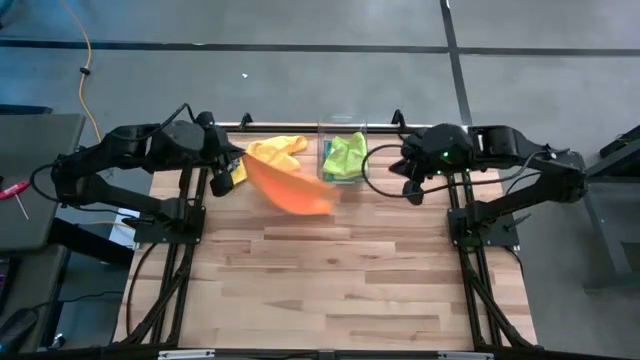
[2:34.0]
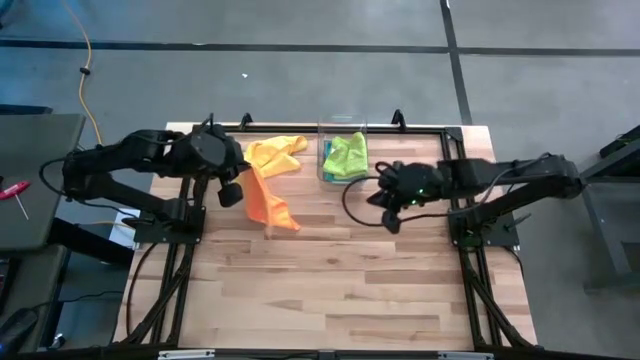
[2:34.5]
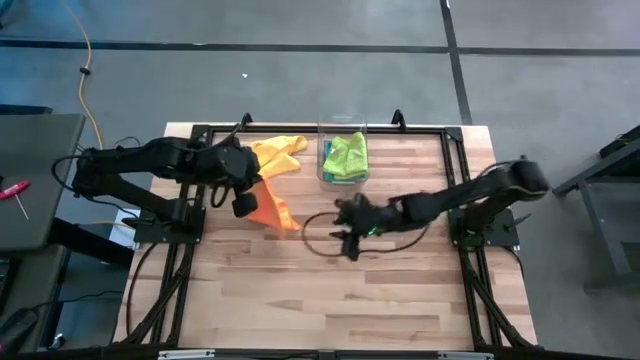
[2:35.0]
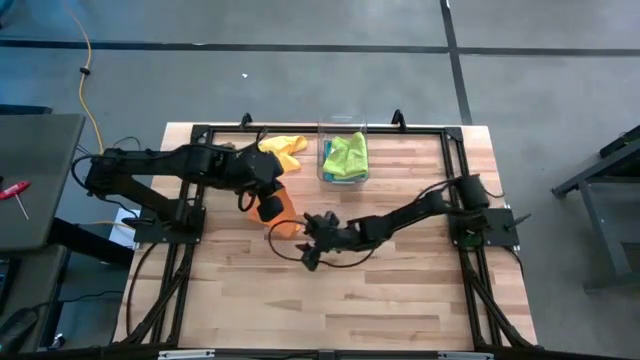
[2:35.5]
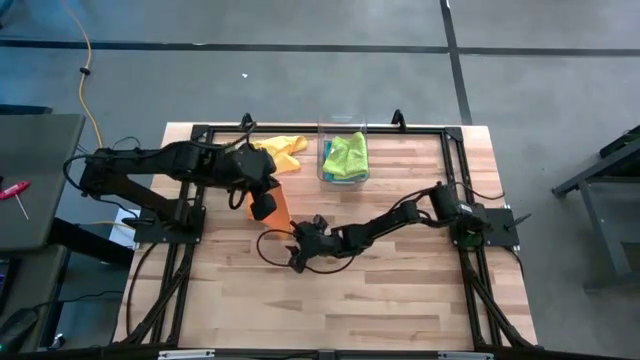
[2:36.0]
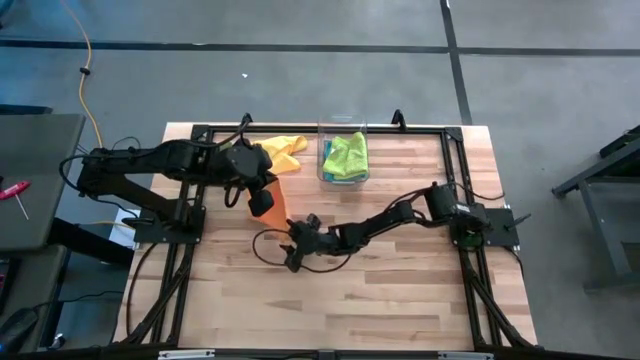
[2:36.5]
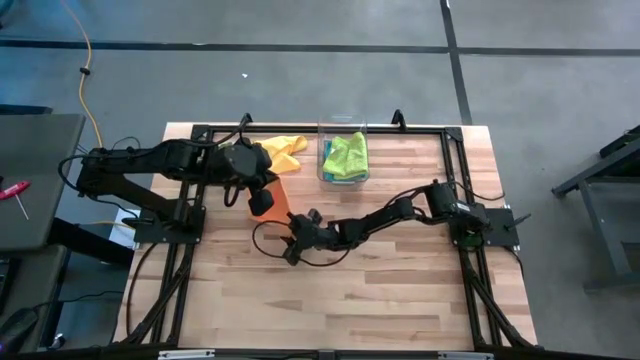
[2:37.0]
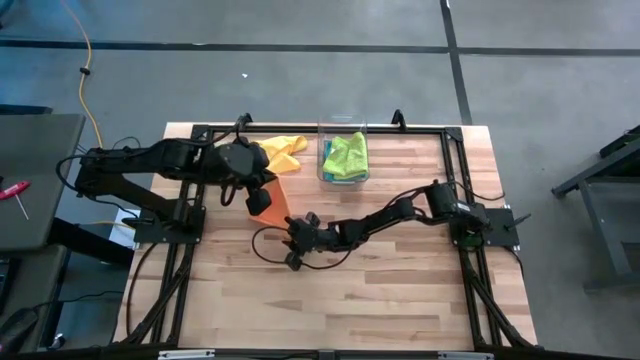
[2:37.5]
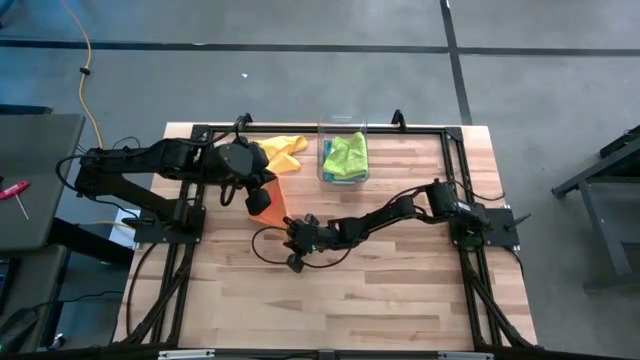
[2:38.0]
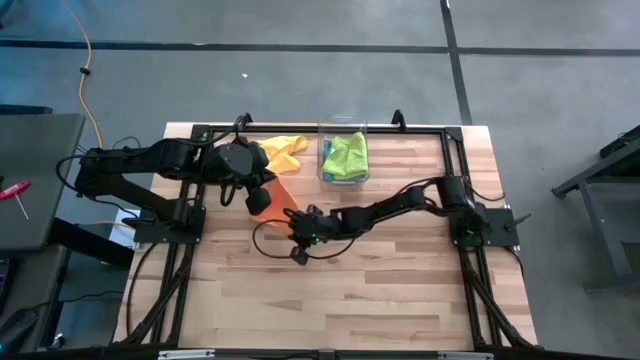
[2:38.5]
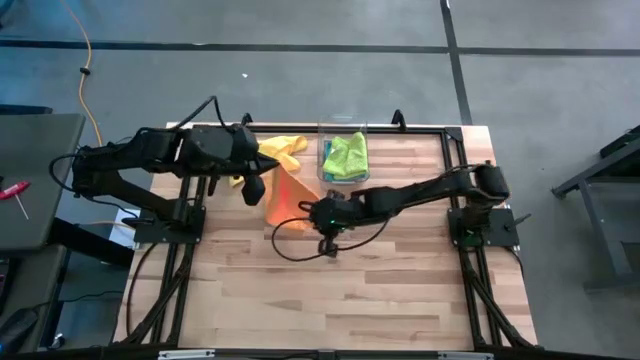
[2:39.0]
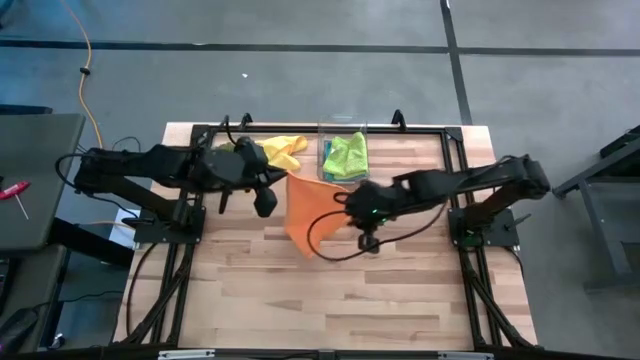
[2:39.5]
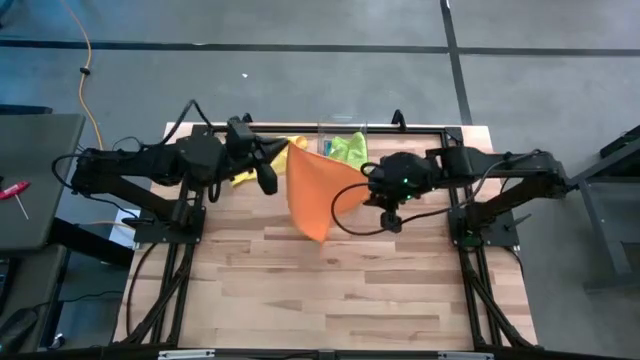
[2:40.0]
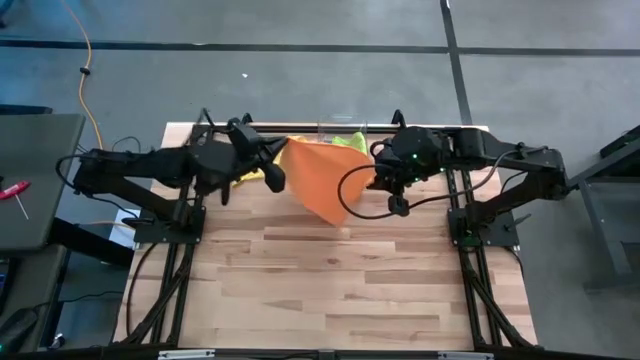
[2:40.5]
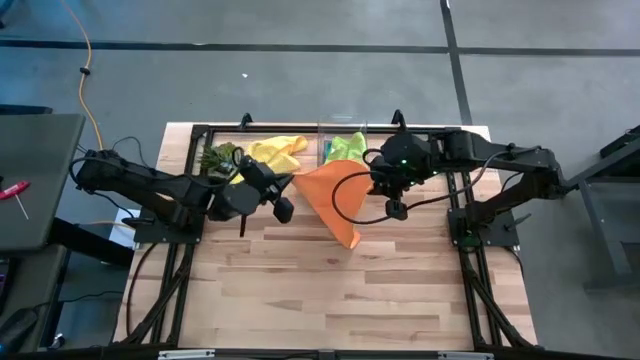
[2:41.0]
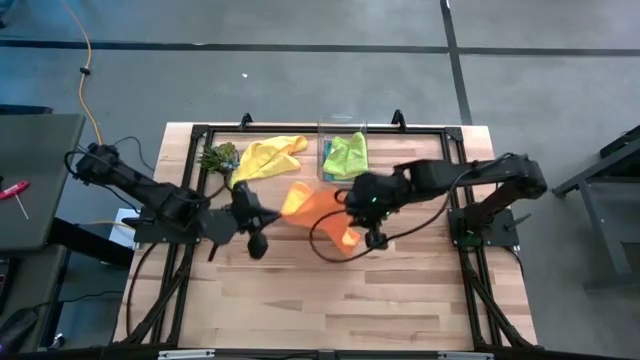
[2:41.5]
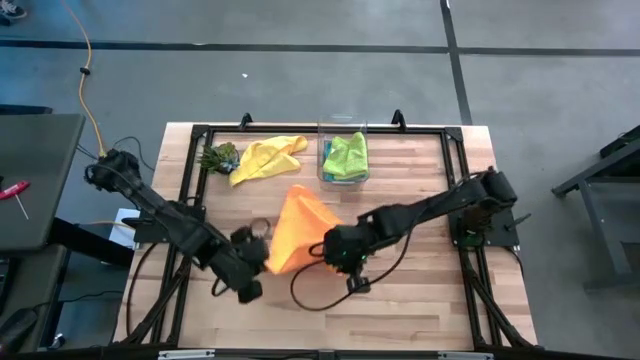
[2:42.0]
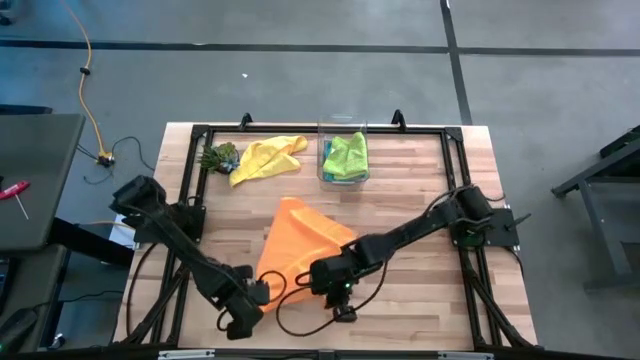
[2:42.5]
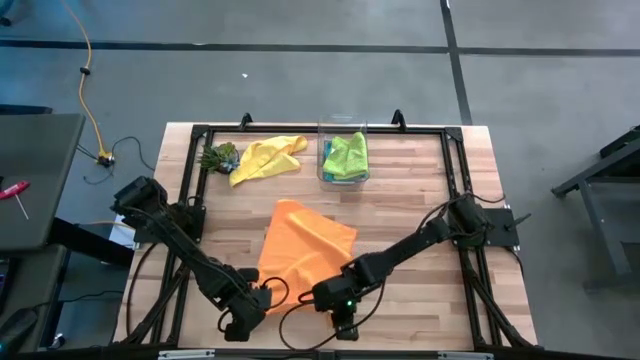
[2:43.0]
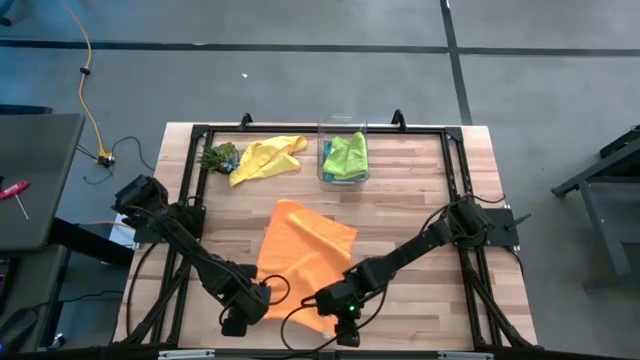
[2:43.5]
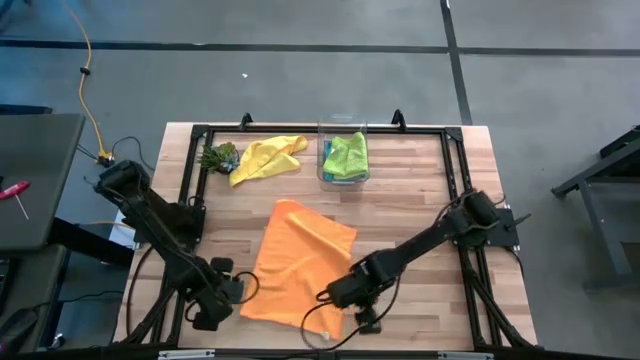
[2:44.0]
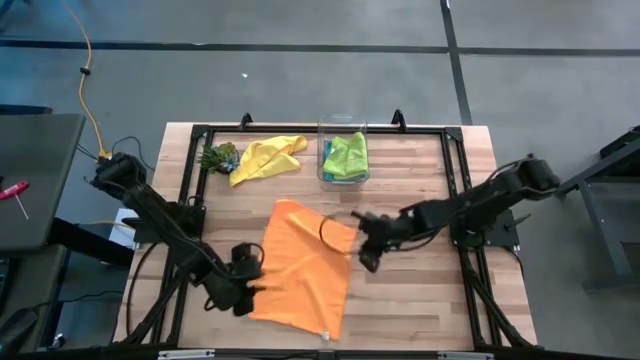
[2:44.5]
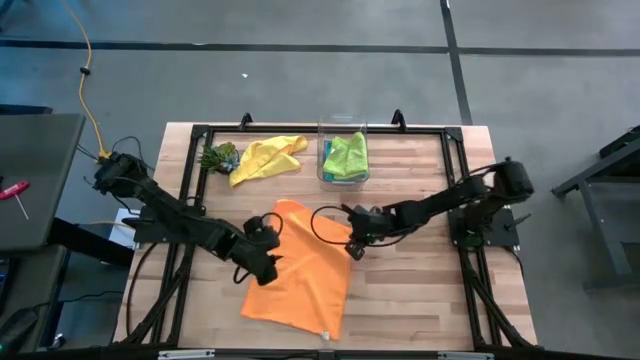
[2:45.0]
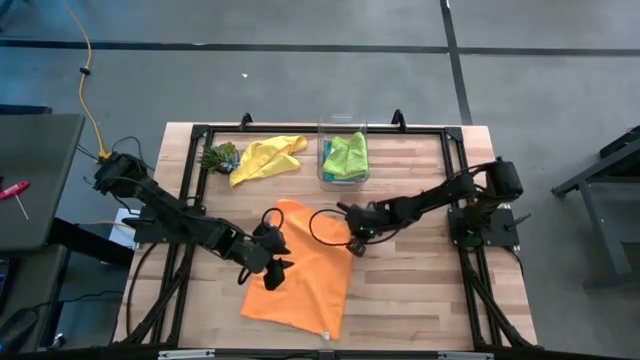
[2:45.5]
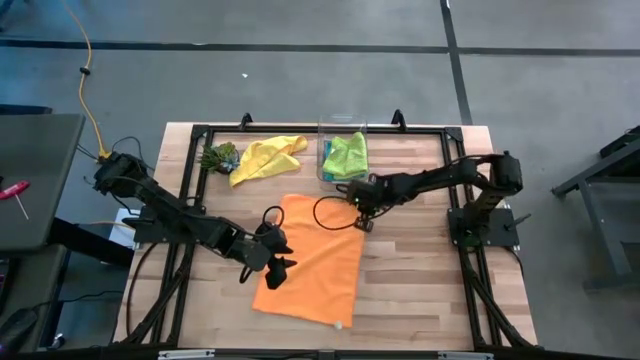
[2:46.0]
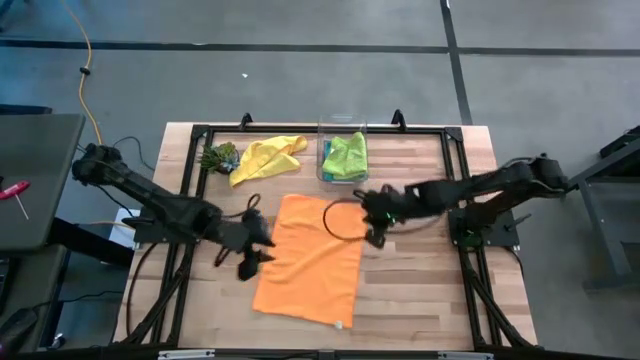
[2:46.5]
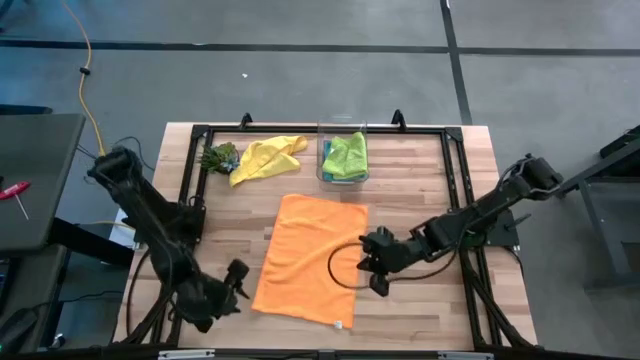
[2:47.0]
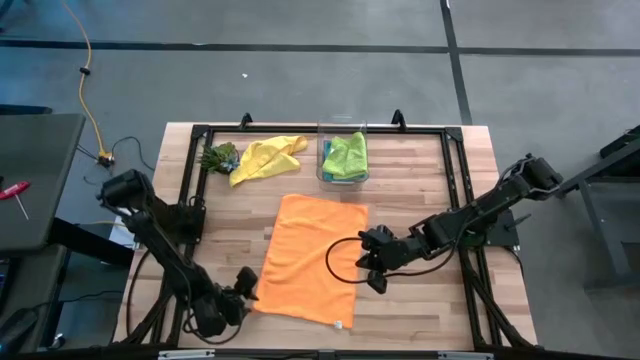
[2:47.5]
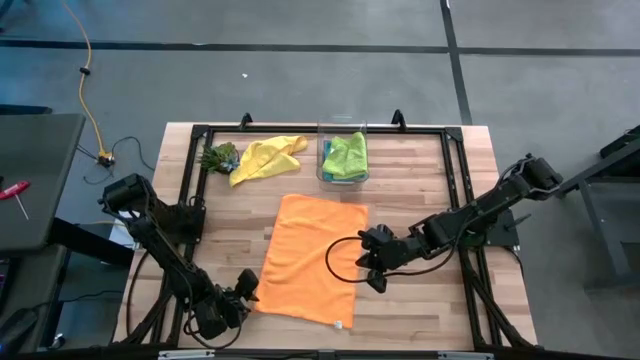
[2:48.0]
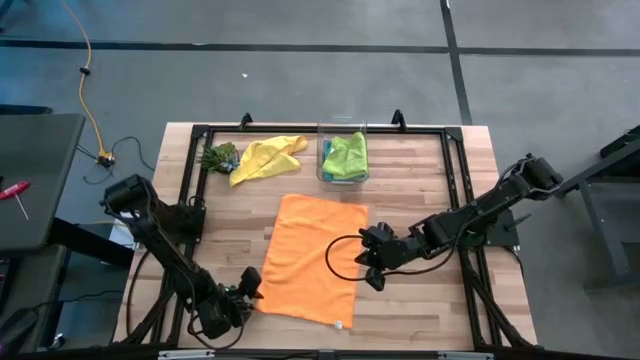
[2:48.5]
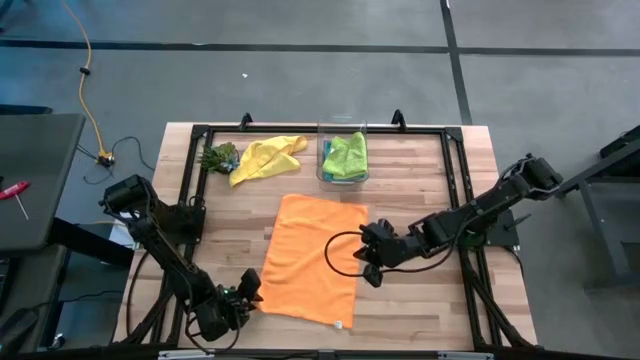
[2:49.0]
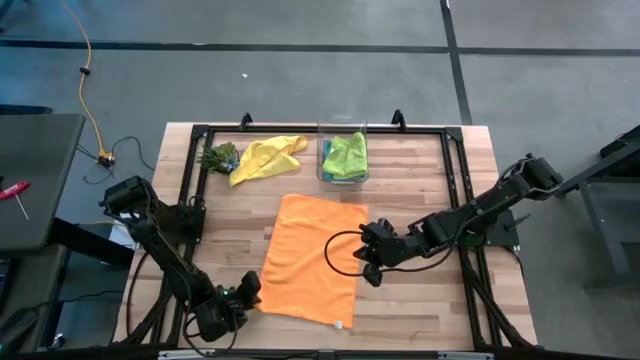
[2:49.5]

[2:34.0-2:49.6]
Task: Fold microfiber towels
Fold the orange microfiber cloth

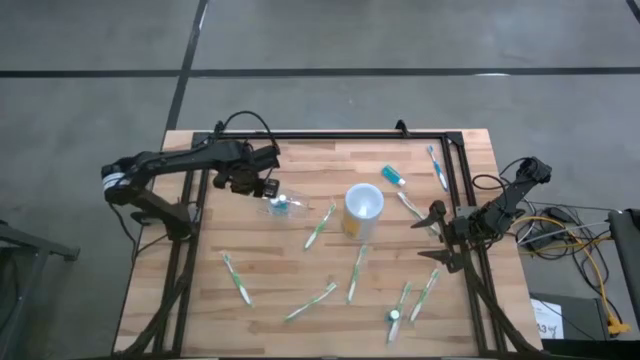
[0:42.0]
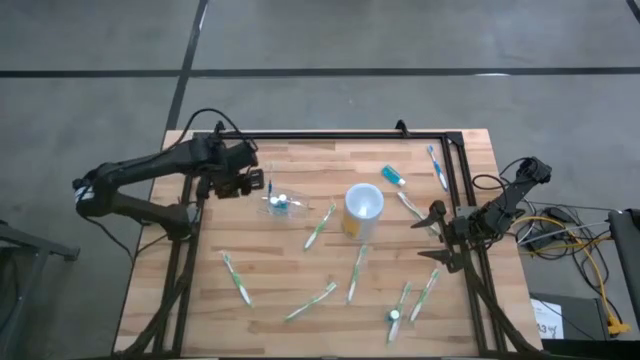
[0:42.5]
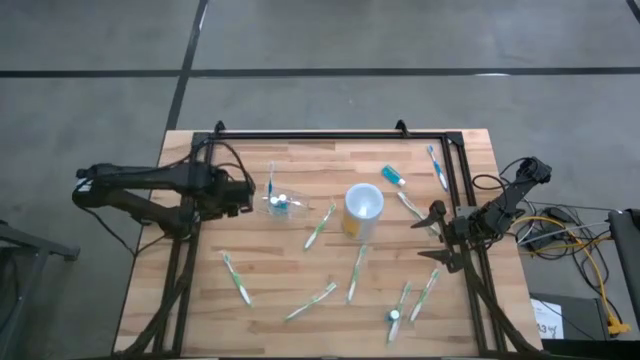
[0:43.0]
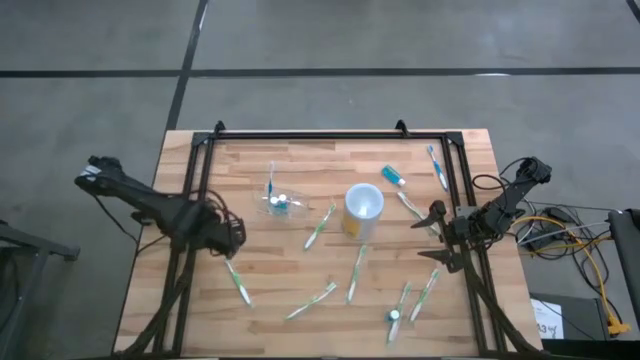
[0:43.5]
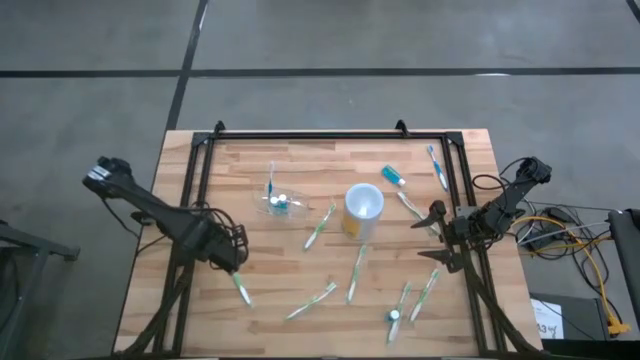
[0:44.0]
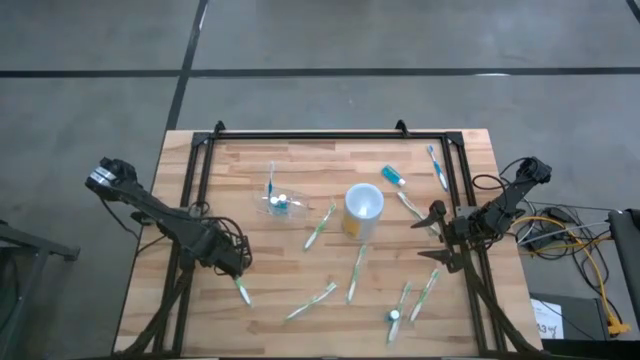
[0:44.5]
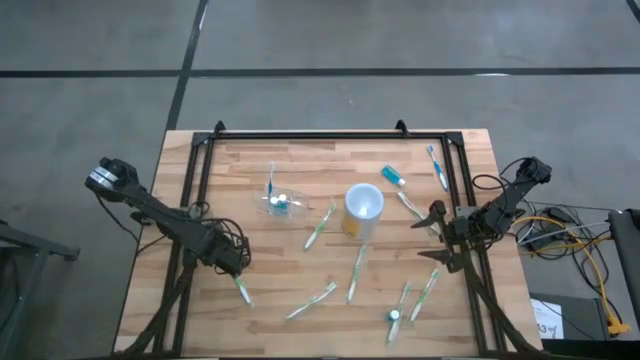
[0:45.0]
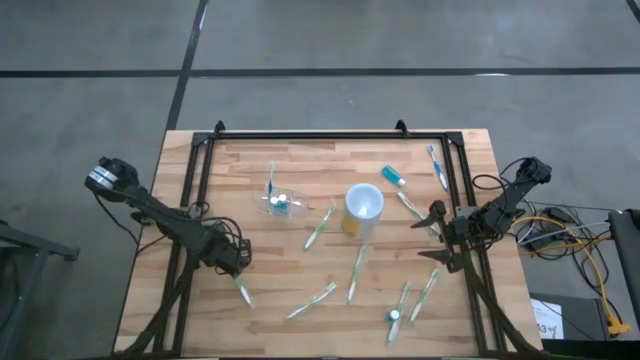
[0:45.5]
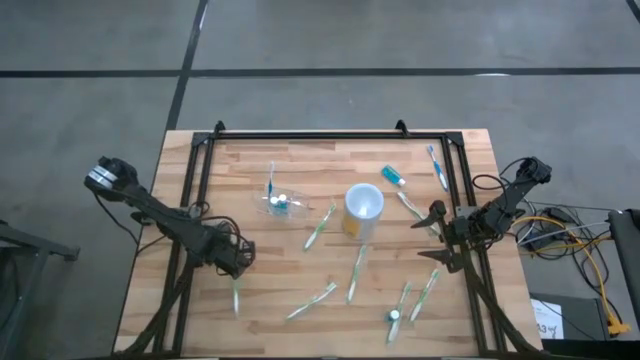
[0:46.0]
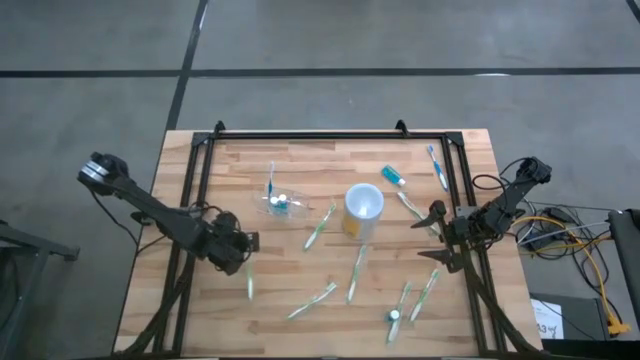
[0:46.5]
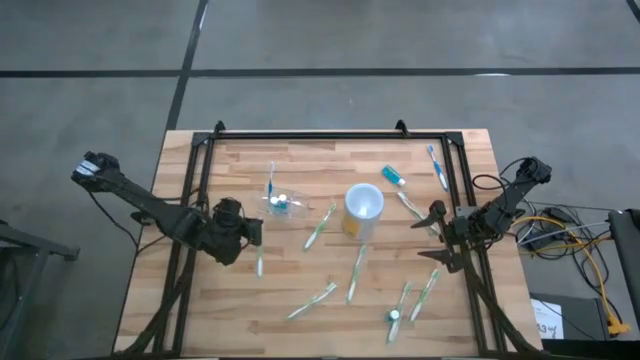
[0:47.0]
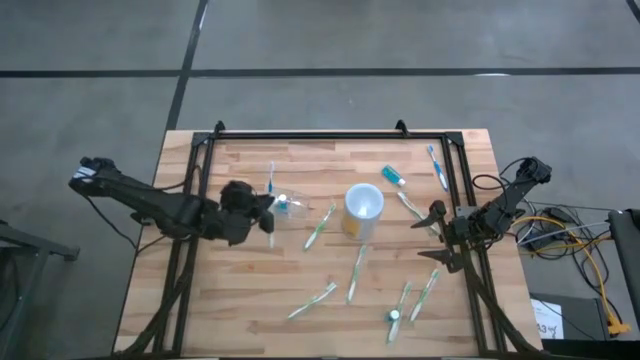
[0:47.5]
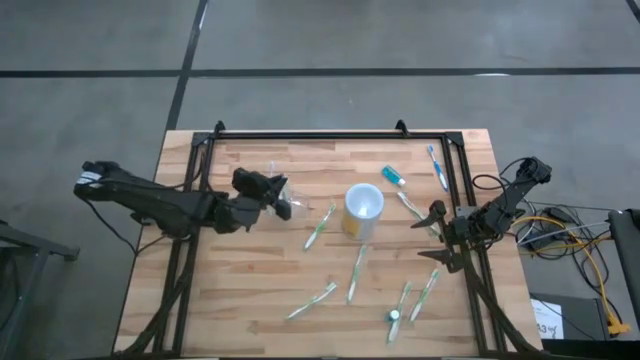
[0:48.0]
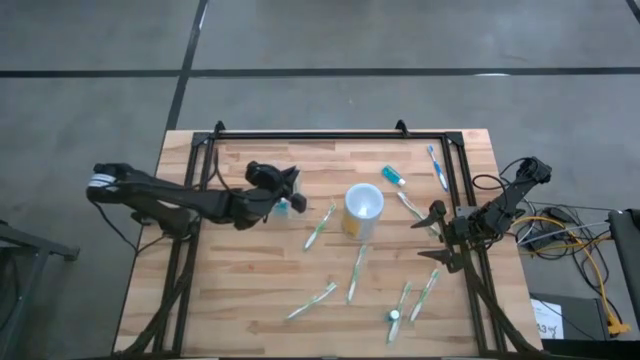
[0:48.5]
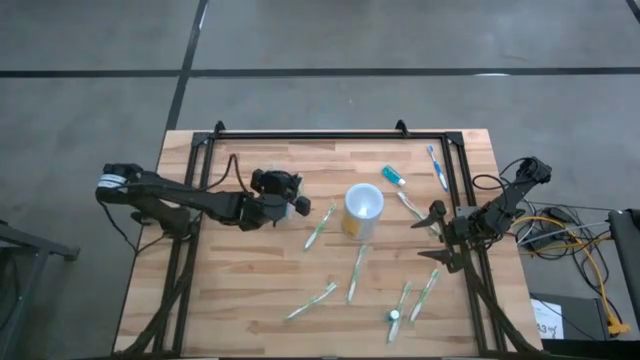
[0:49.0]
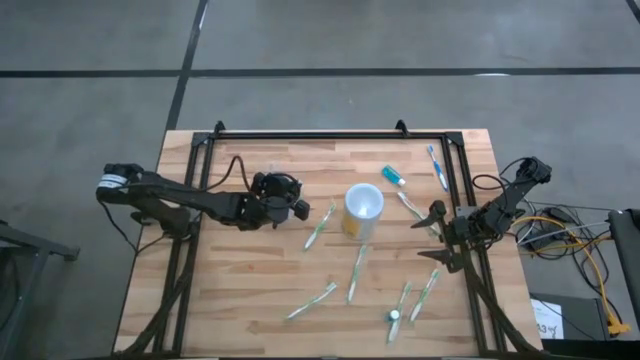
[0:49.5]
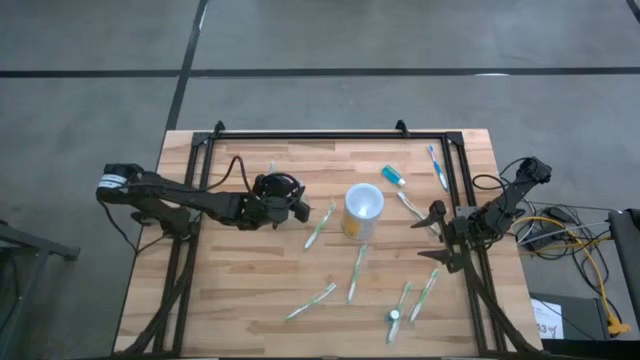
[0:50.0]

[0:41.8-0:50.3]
Task: Pick & Place toothbrushing station
Put the green toothbrush into the right section of the transparent organizer
